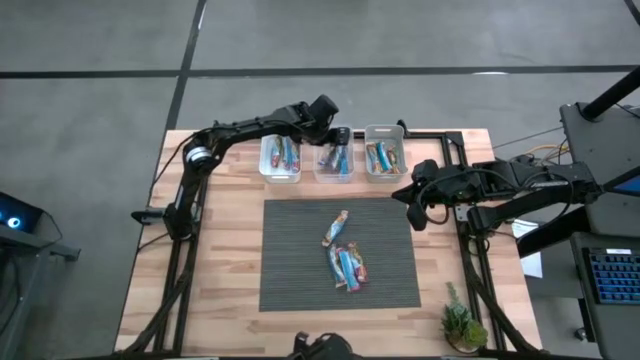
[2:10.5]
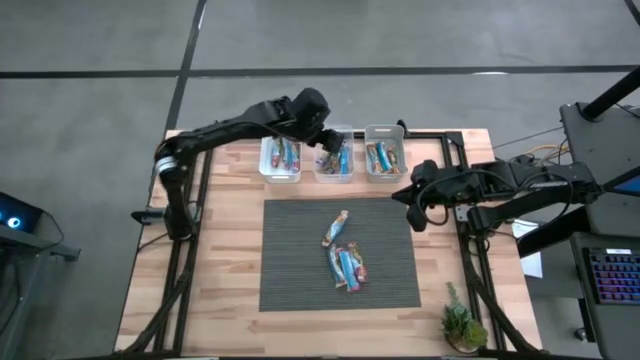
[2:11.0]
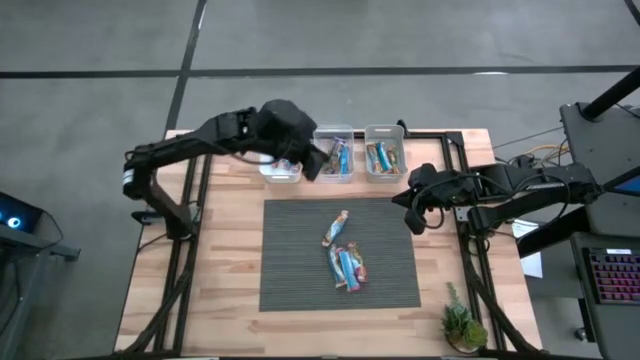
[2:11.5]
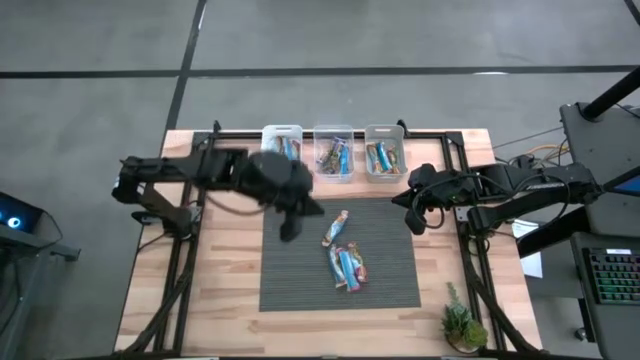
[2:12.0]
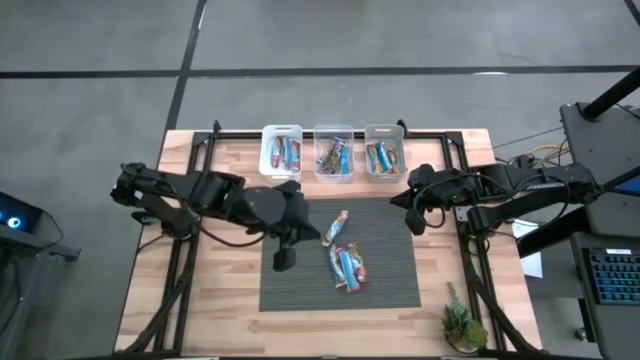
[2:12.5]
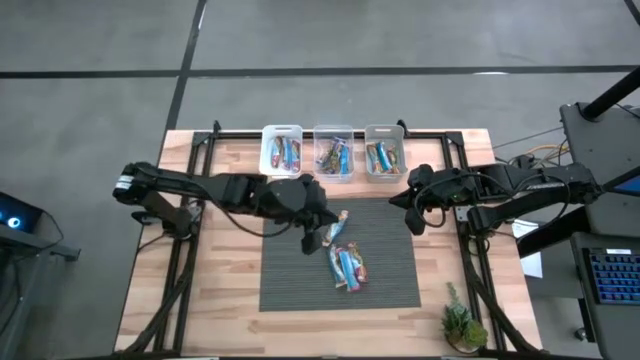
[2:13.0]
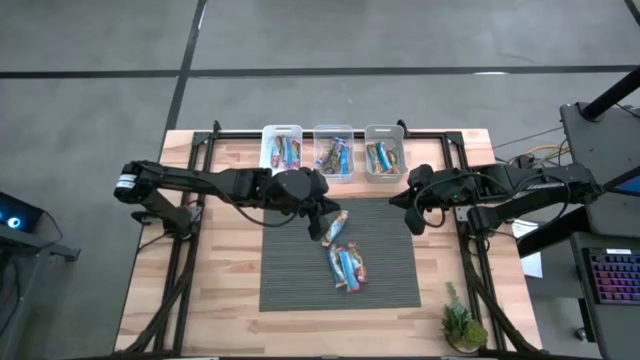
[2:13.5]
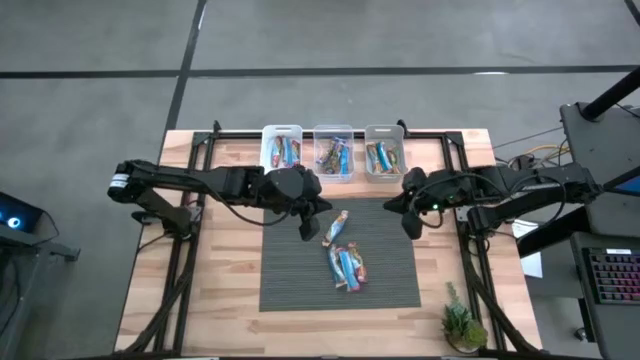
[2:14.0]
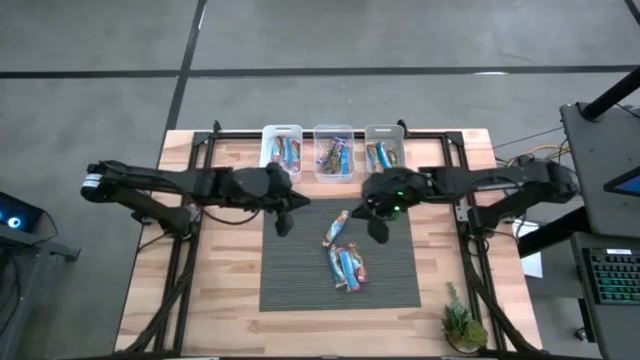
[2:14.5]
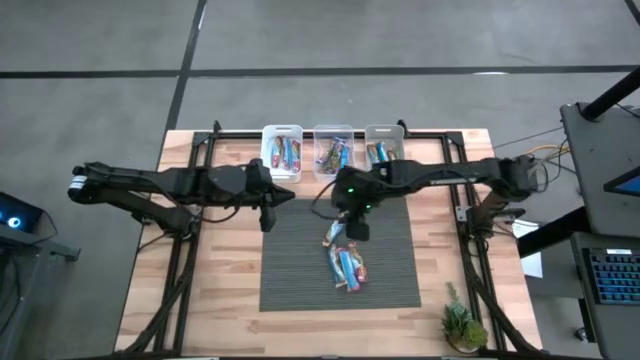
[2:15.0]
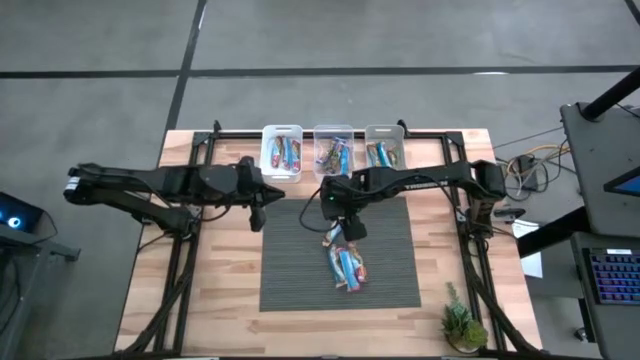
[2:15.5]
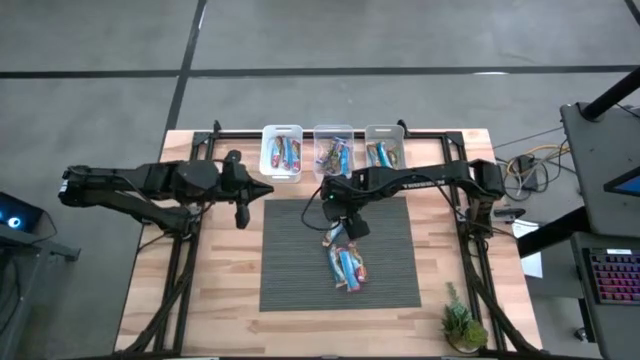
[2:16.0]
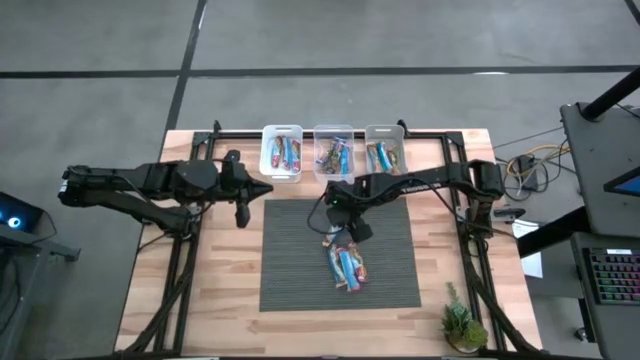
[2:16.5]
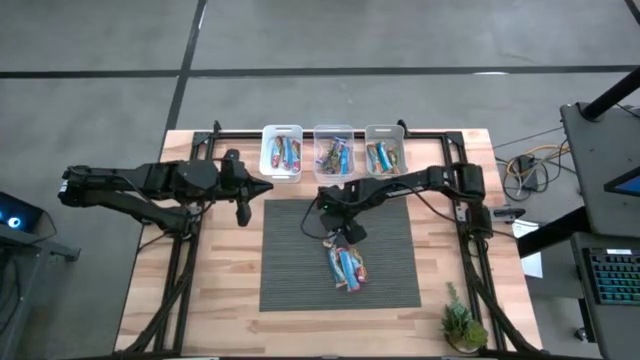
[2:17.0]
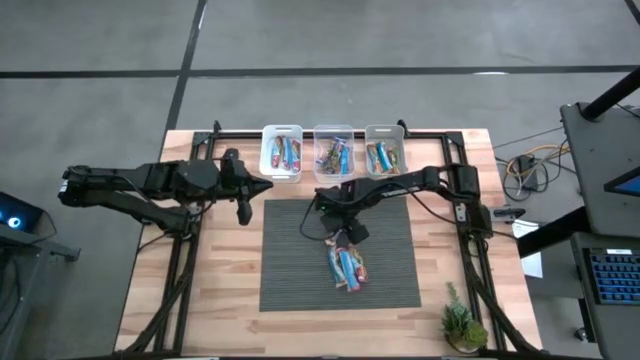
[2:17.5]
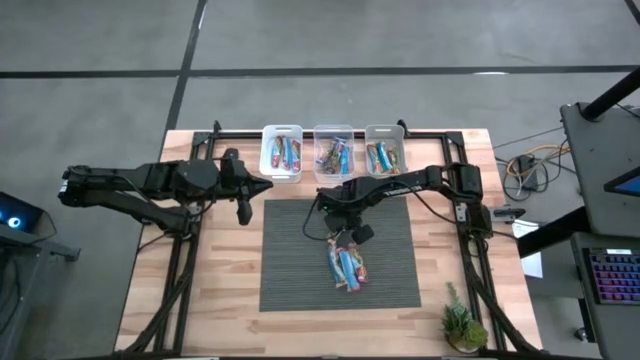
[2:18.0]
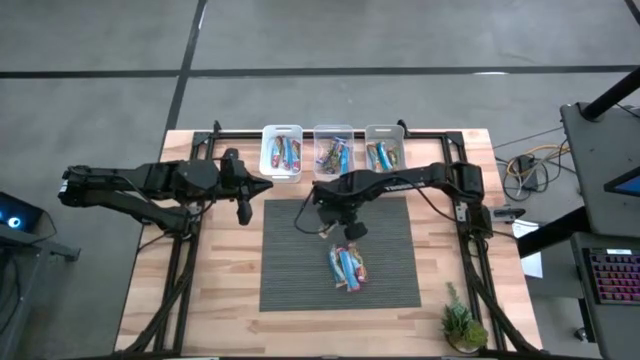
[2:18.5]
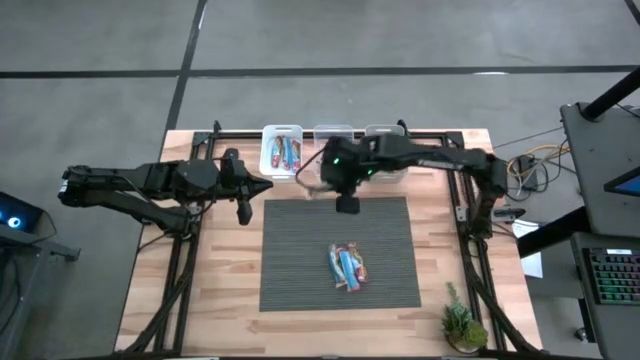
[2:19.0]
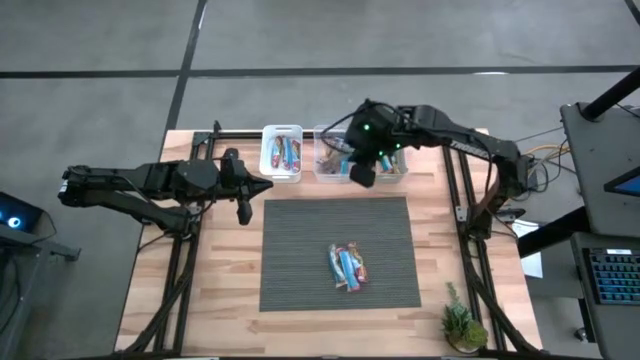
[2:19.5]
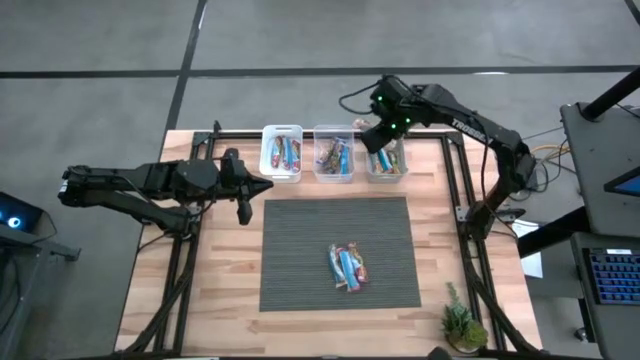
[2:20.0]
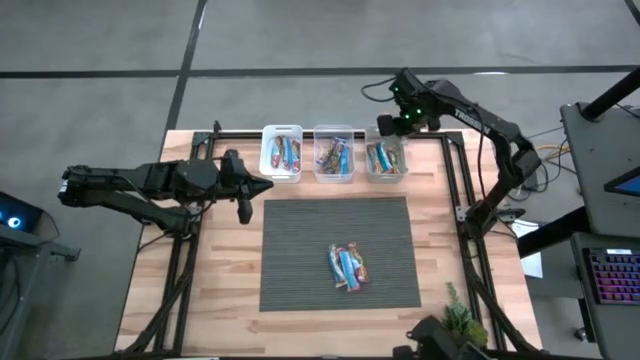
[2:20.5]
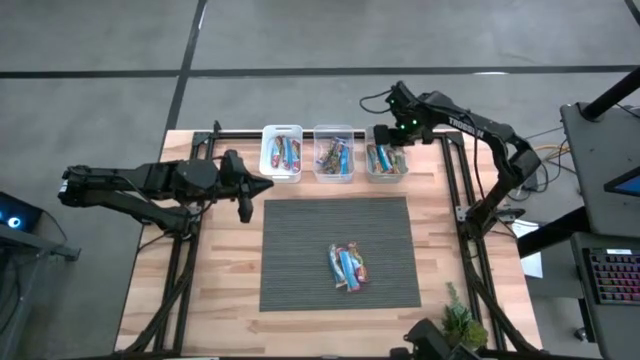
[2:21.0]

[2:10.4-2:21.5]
Task: Pick and place Granola Bars by type
Put the yellow granola bar into the gray bin

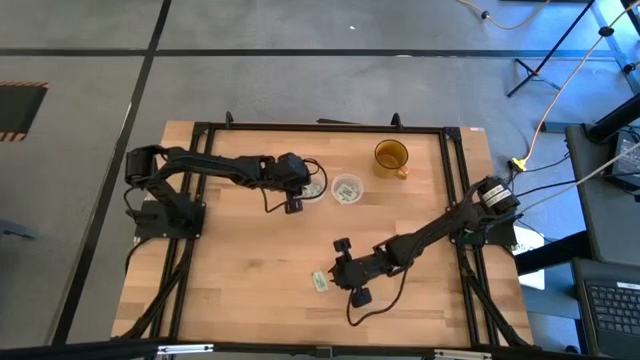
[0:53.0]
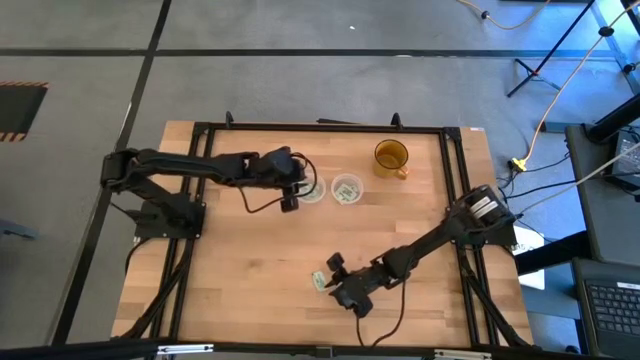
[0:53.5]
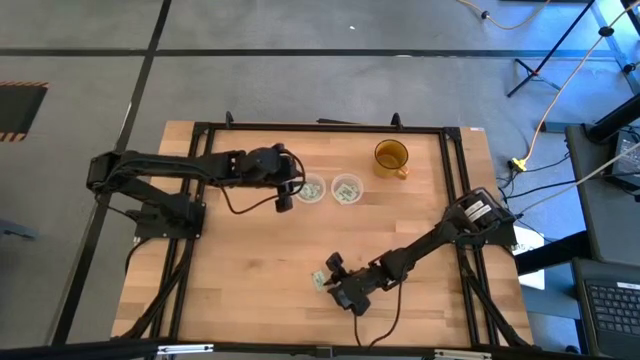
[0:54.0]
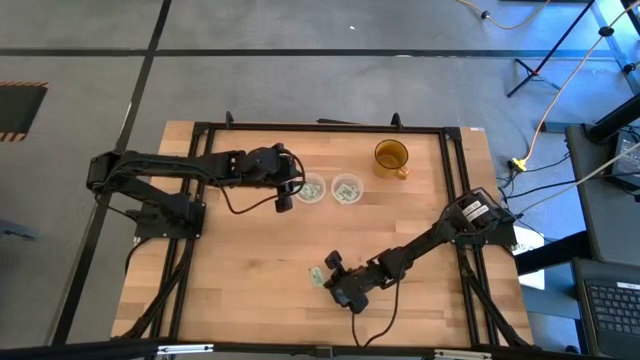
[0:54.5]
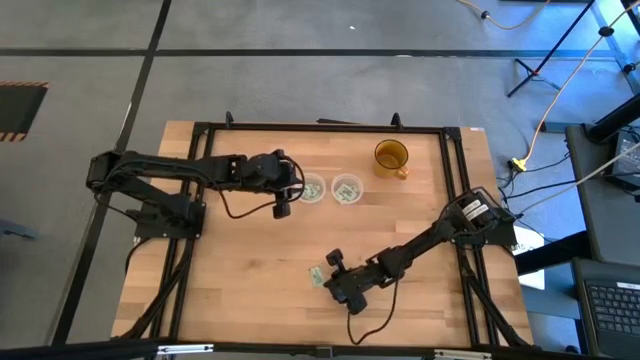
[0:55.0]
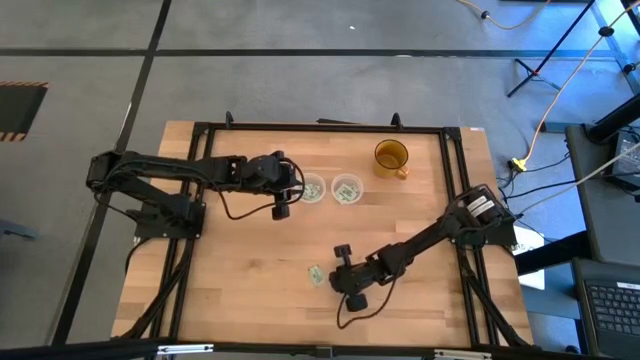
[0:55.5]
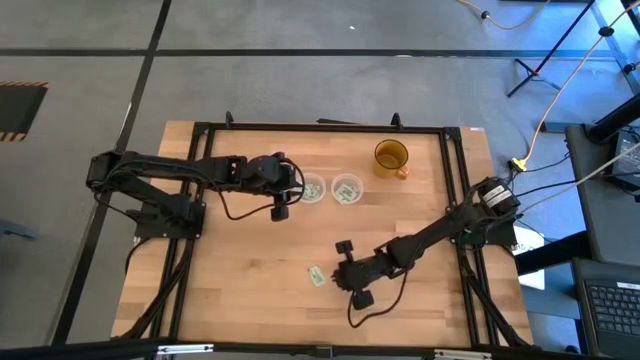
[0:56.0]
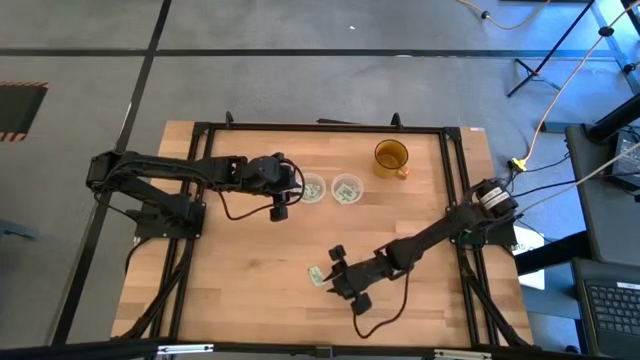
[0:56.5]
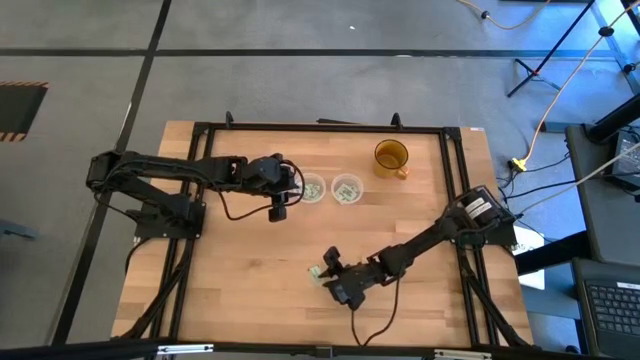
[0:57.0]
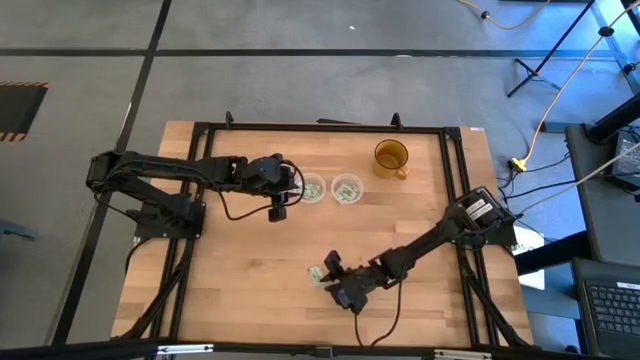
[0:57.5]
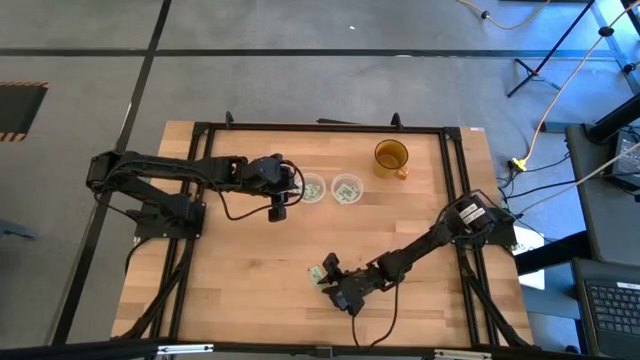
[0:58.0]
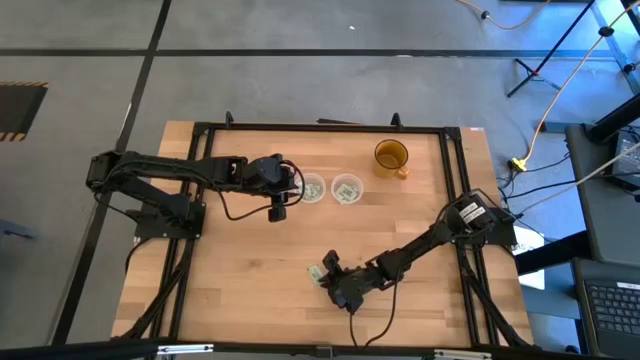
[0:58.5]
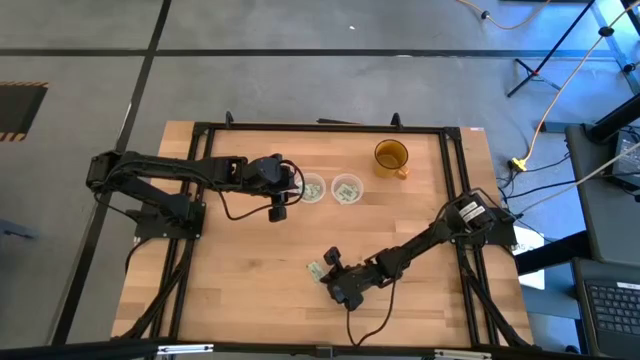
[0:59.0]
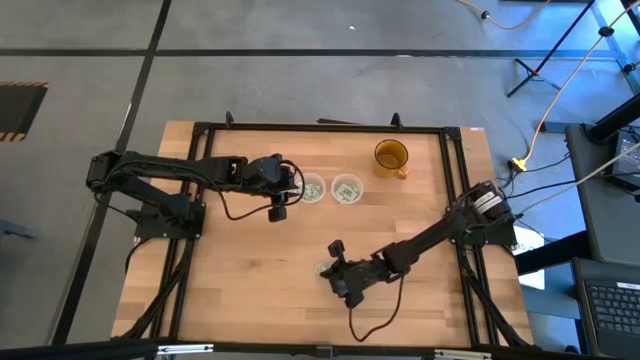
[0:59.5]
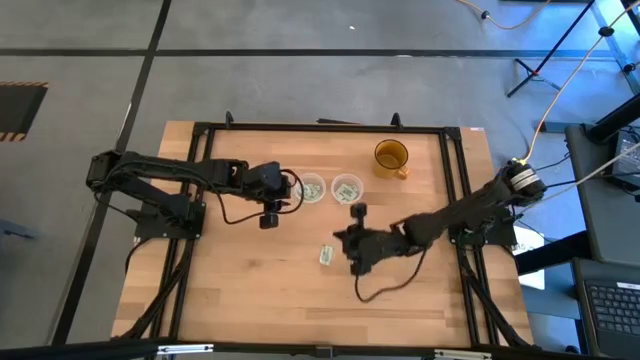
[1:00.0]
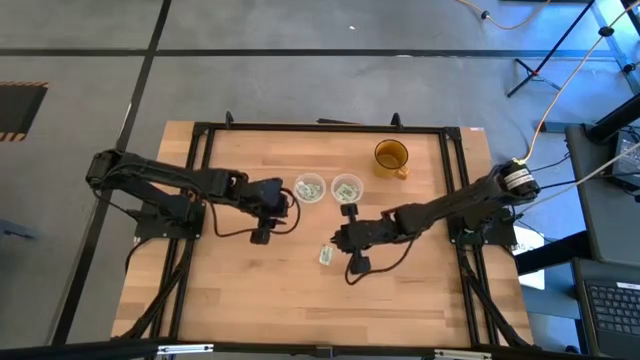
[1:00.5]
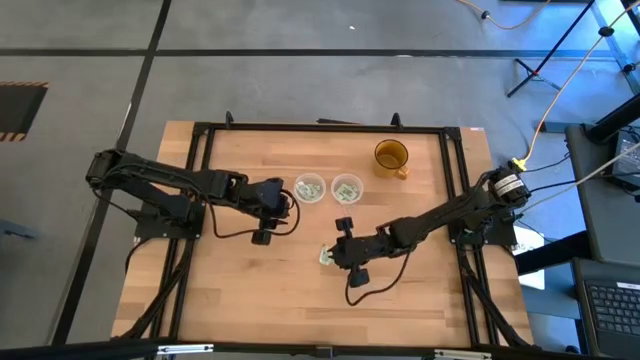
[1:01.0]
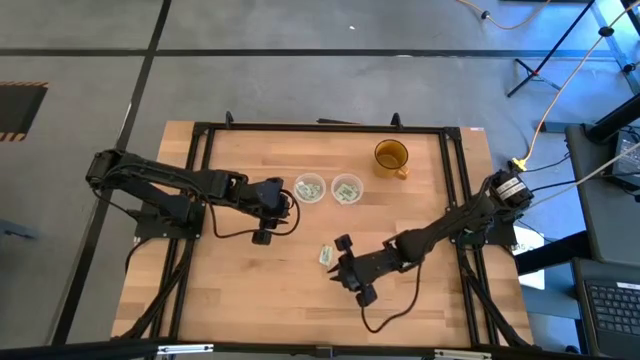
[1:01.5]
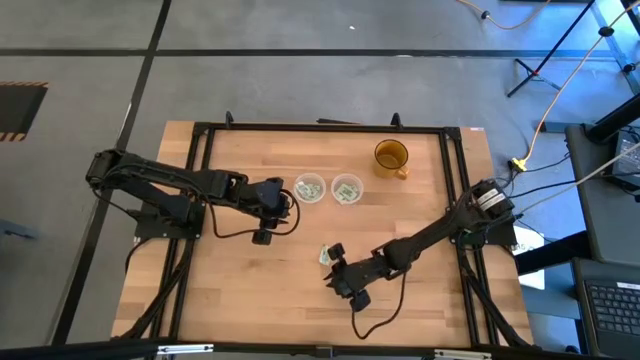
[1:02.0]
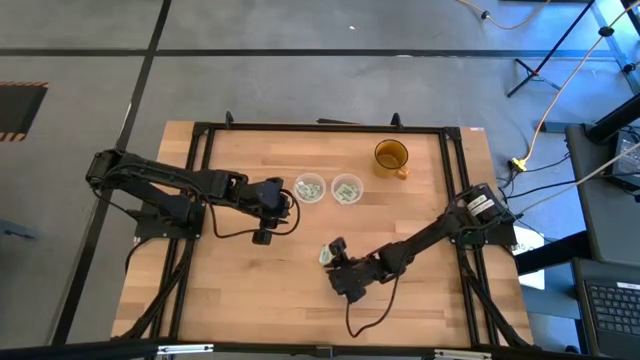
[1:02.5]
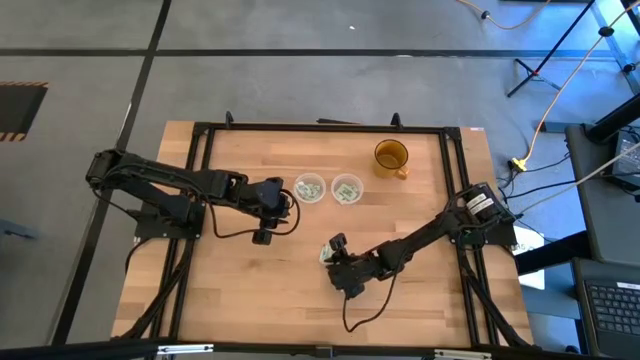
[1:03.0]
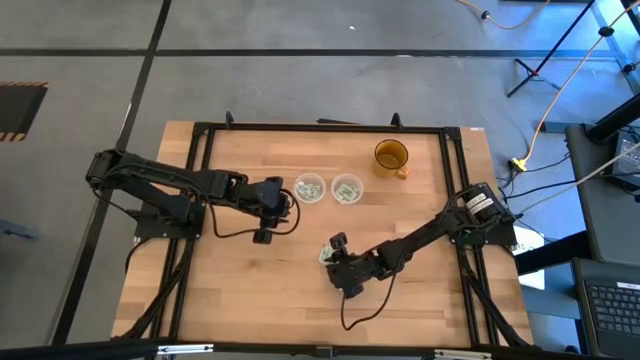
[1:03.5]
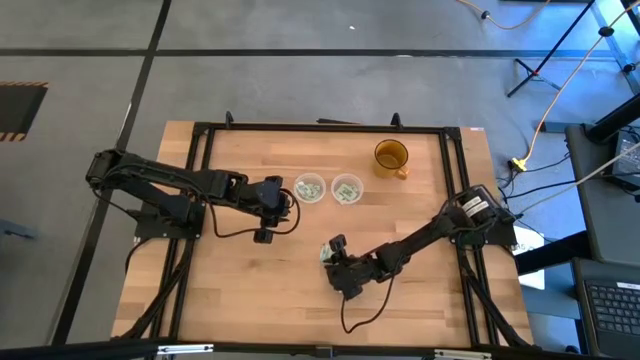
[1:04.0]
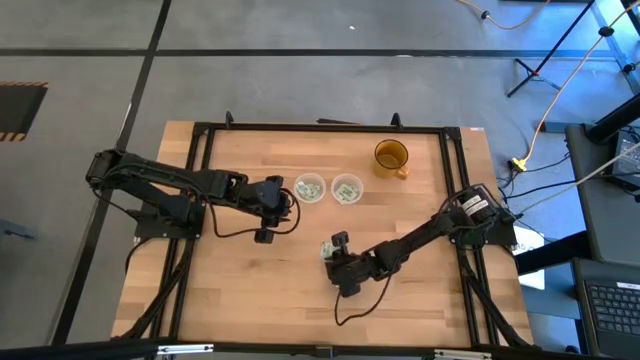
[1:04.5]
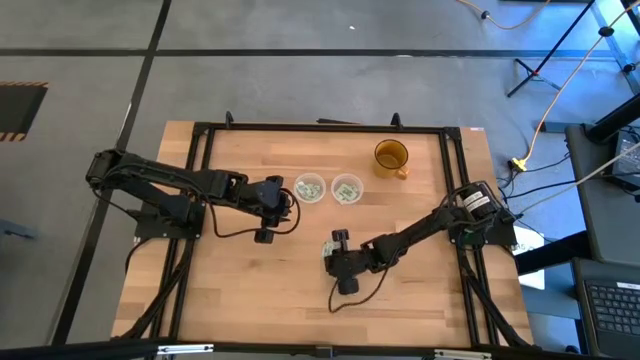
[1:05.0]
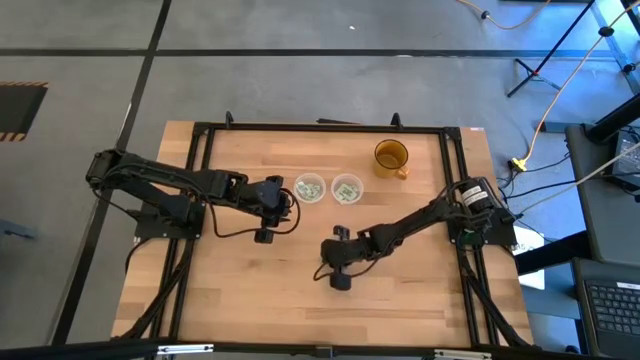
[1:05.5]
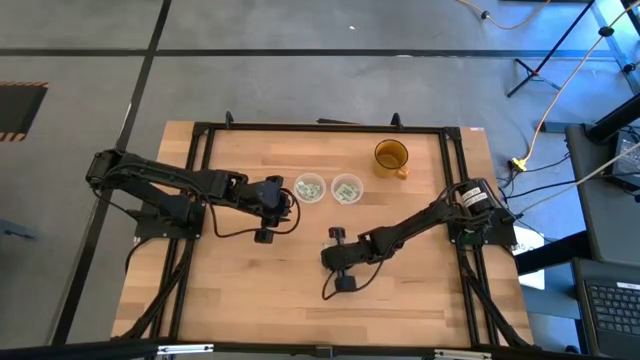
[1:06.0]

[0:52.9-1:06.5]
Task: Pick and place Stevia / Truvia into bins
Put the stevia packet into the right transparent container
